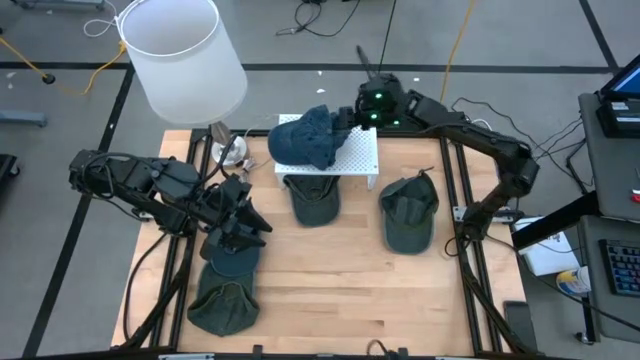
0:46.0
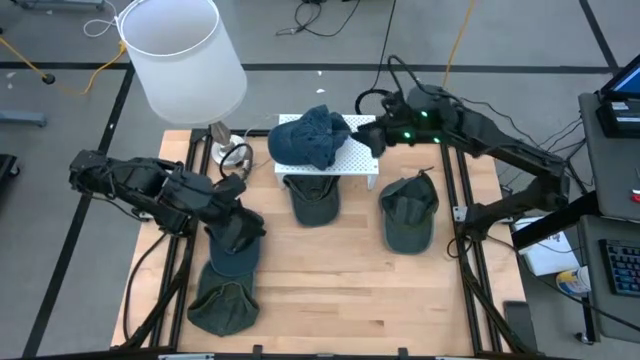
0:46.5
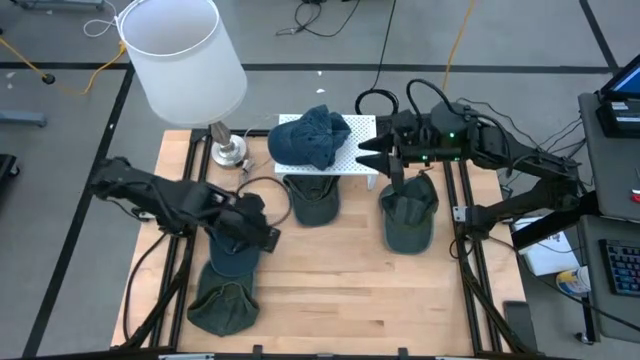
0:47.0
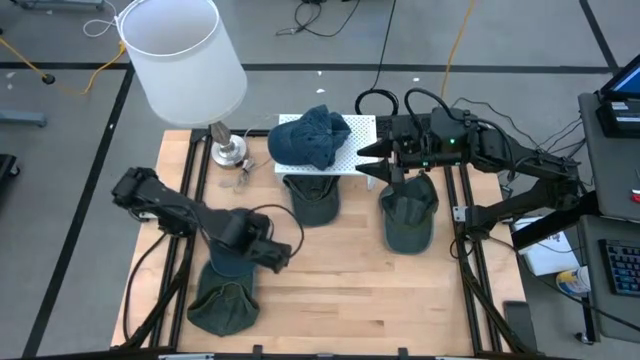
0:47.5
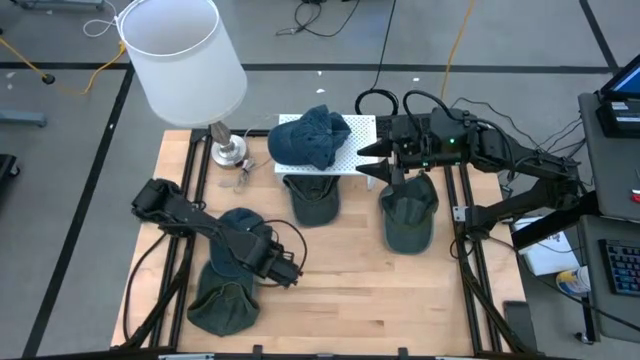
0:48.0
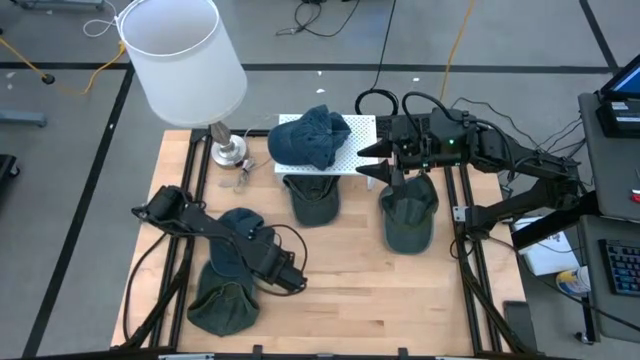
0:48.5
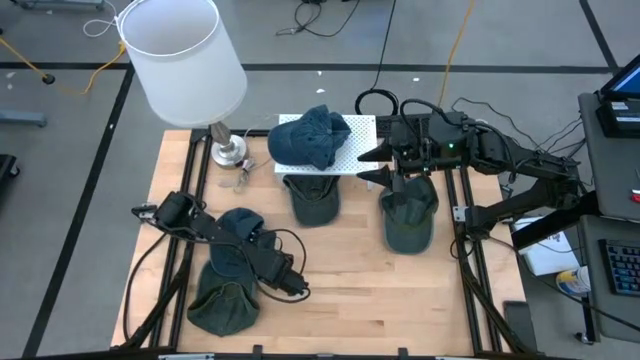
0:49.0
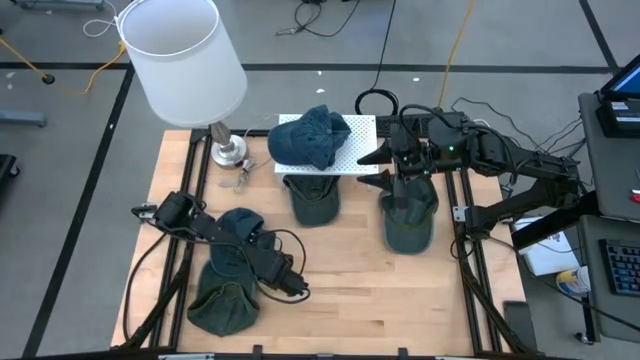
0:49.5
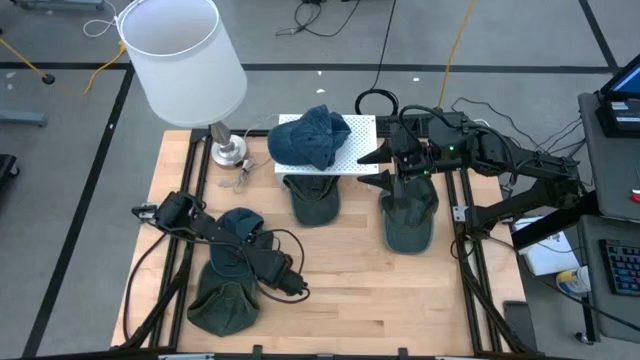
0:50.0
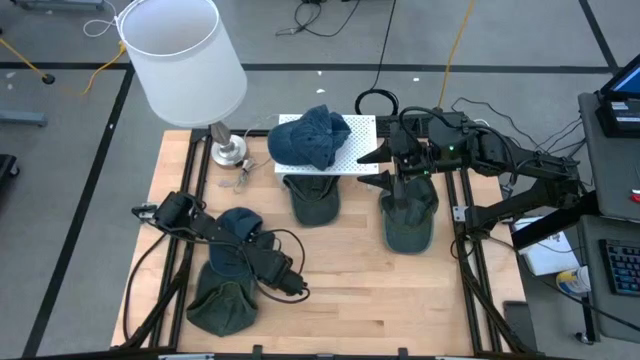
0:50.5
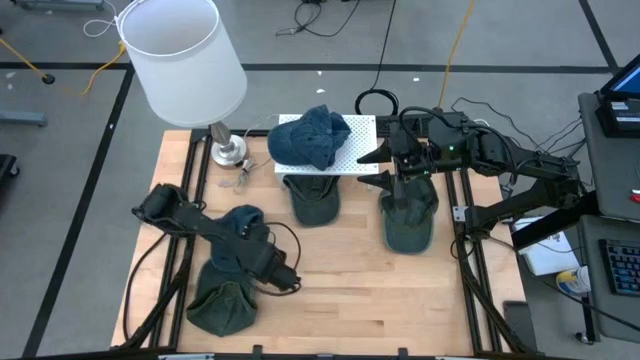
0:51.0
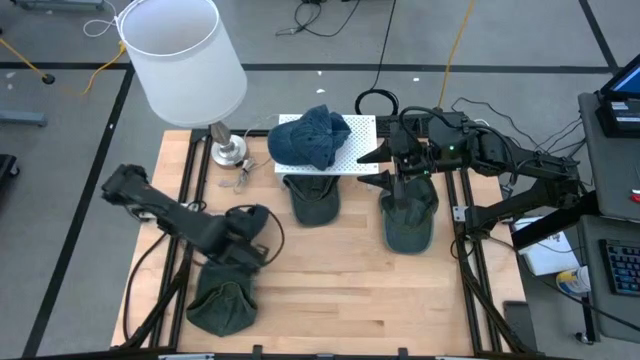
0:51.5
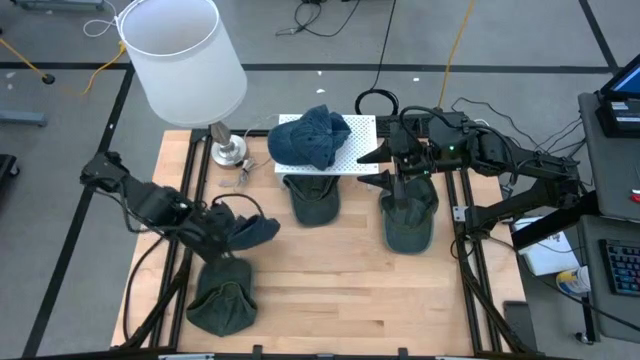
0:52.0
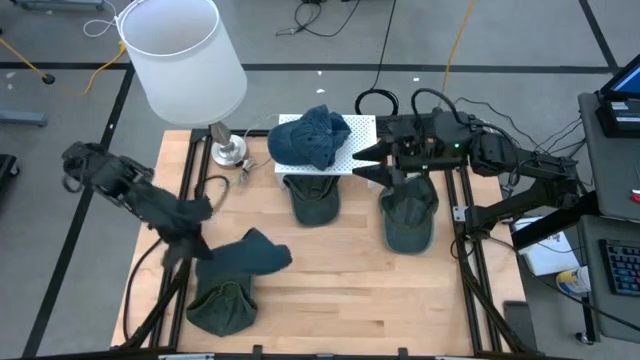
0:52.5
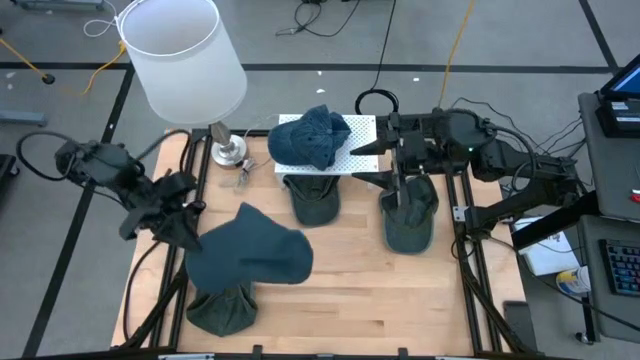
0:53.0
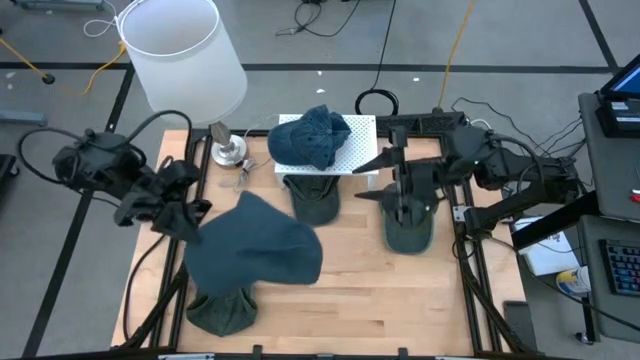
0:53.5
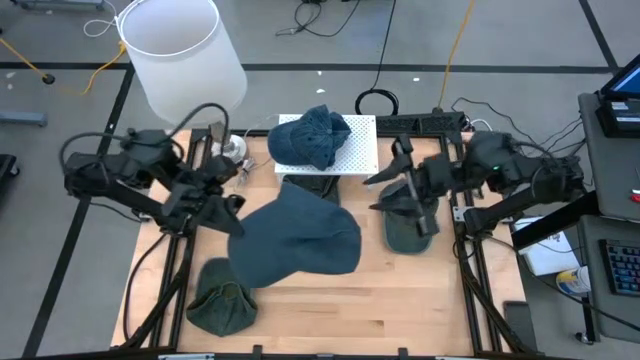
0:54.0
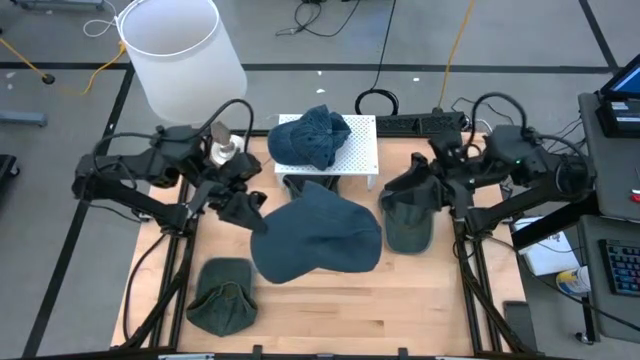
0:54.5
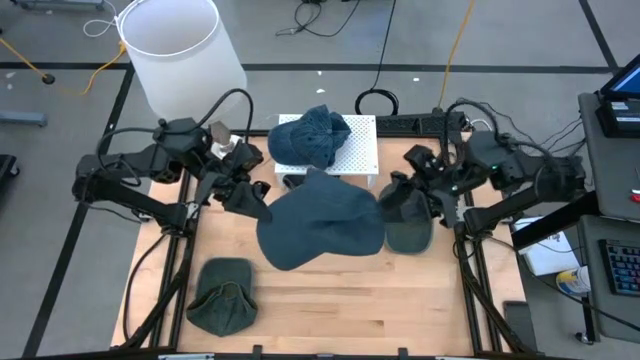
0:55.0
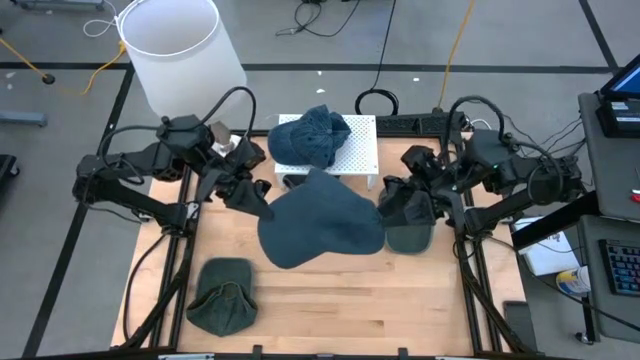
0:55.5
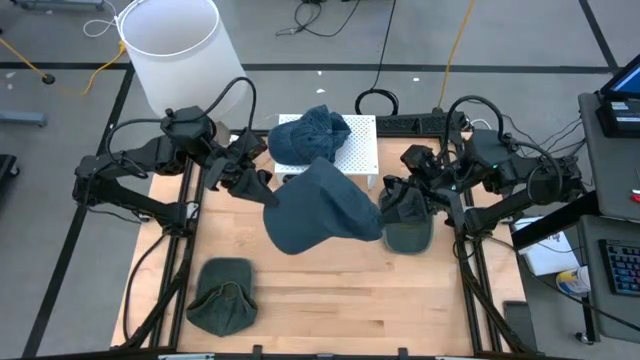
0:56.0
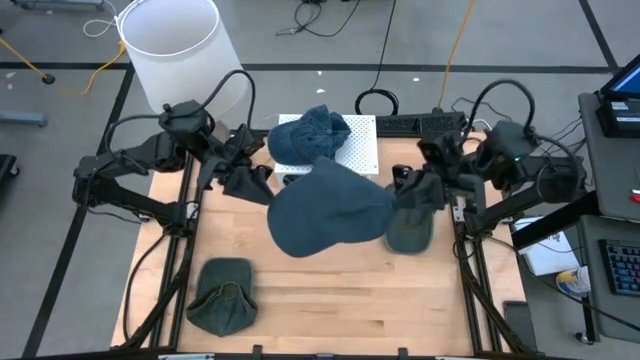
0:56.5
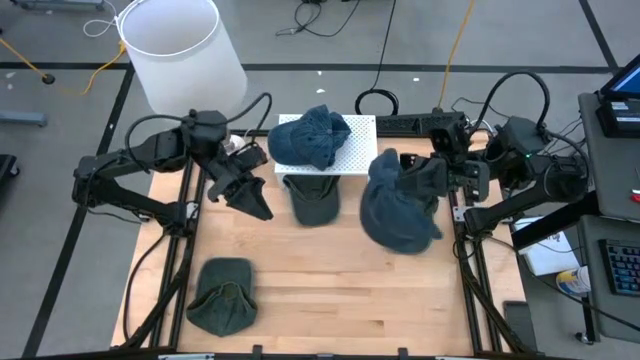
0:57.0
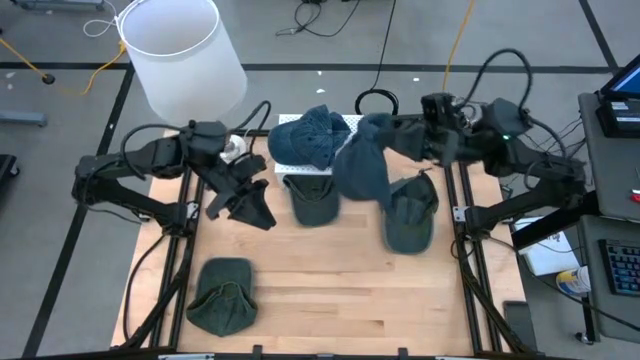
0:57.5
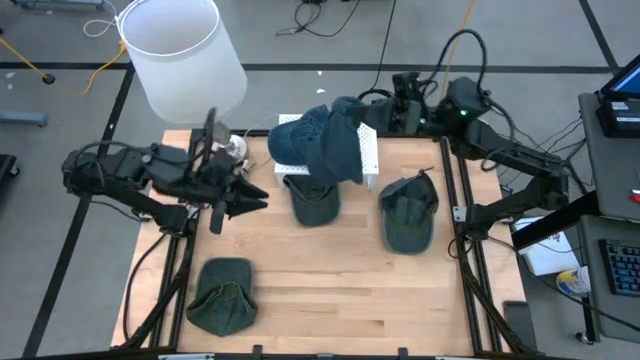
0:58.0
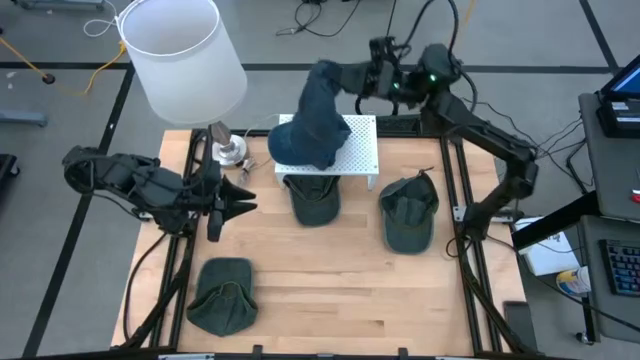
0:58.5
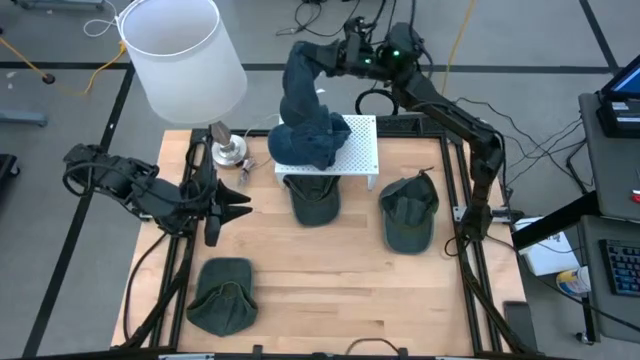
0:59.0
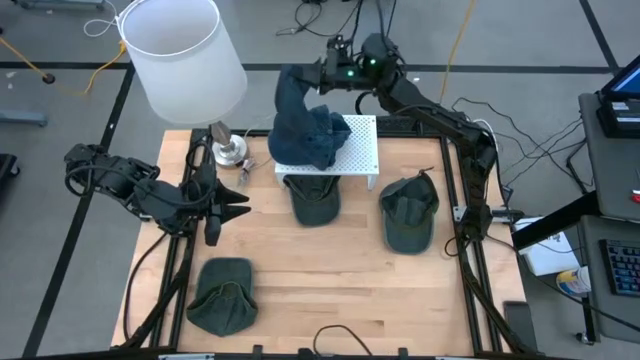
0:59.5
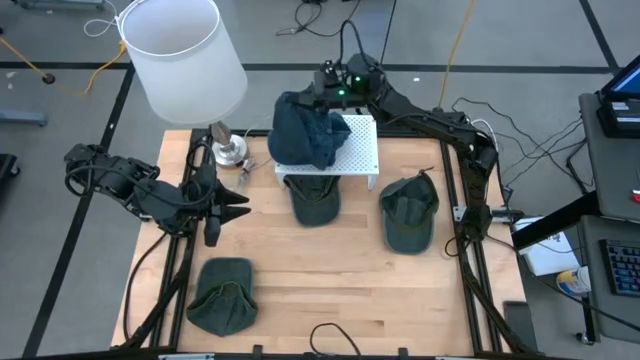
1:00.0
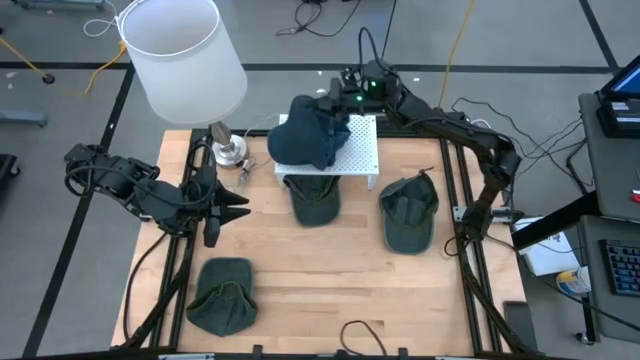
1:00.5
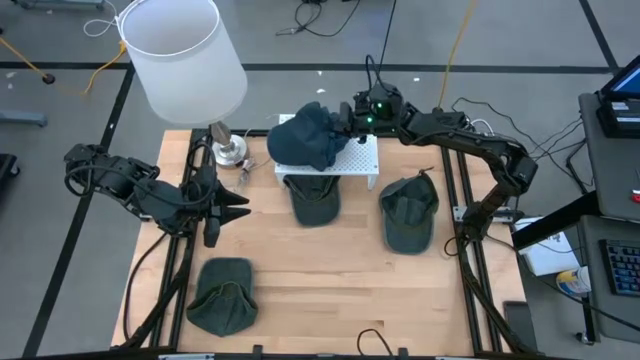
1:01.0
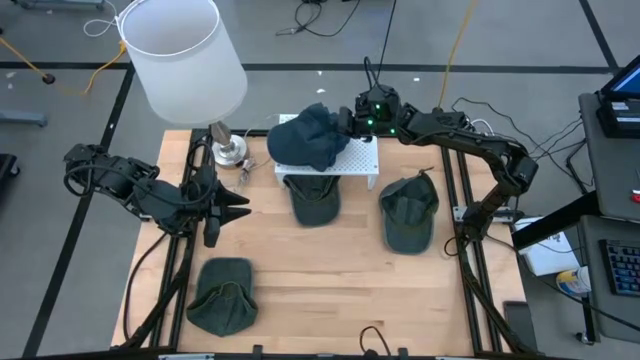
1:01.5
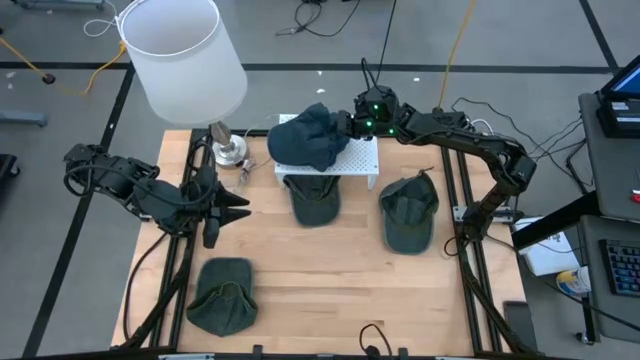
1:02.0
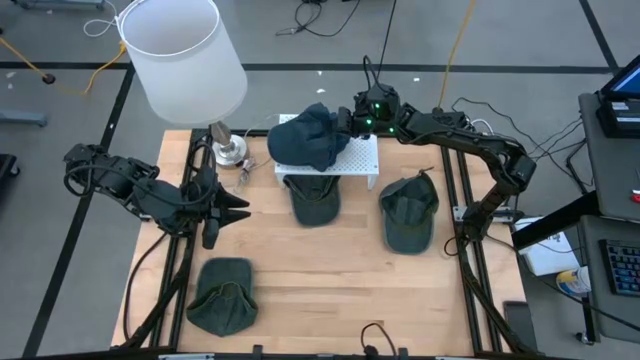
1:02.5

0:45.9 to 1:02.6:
Task: Pick & Place hat
Stack the blue cap on the blue caps on the shelf

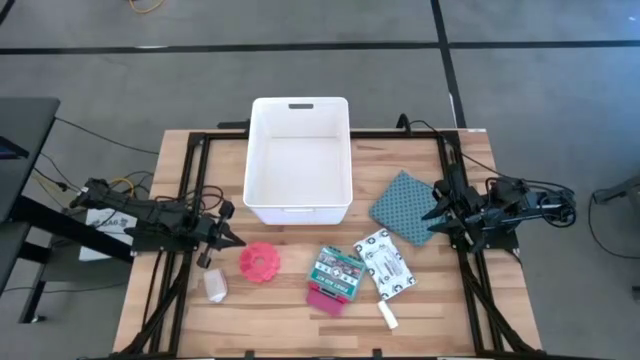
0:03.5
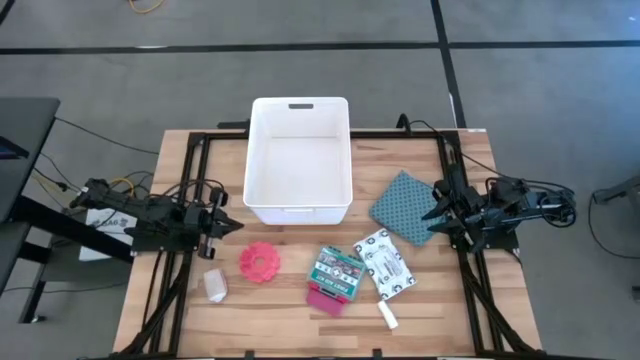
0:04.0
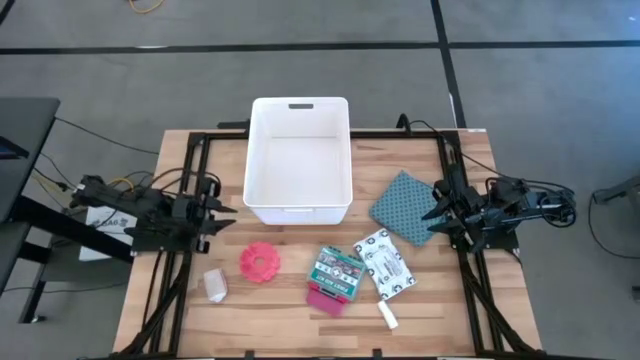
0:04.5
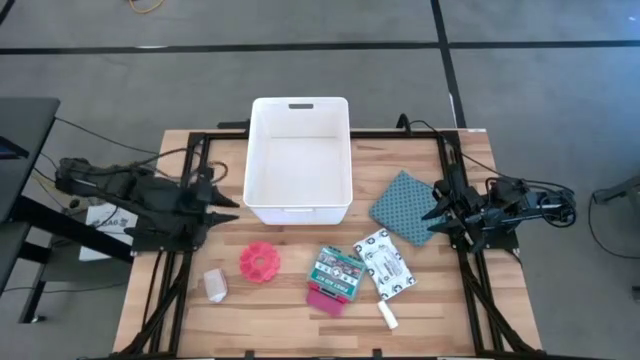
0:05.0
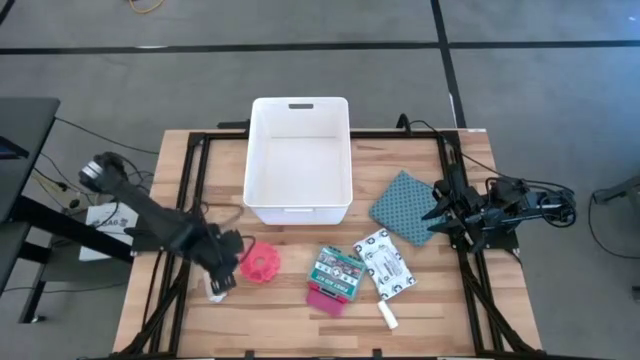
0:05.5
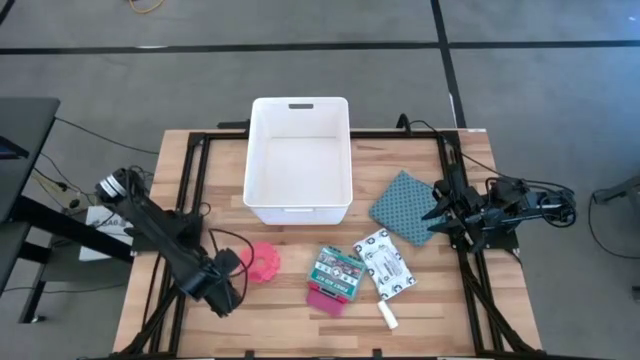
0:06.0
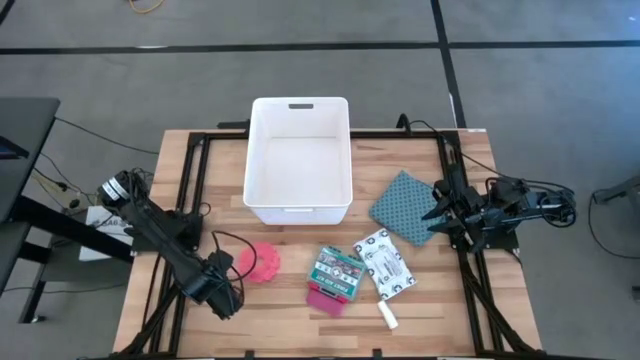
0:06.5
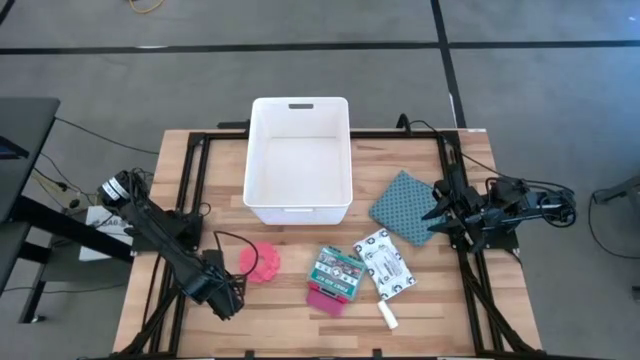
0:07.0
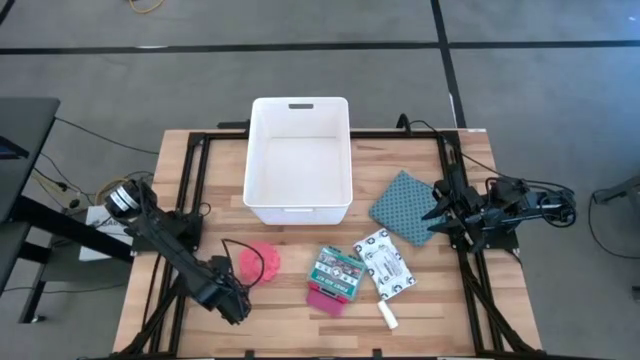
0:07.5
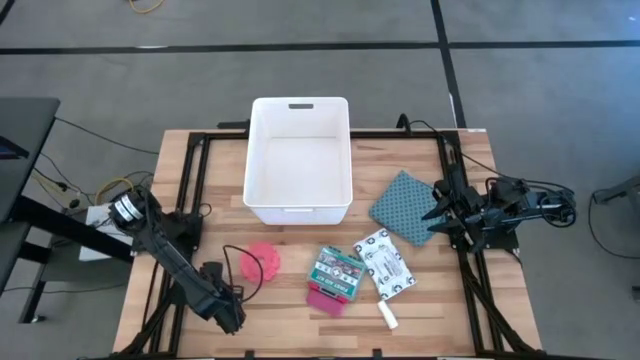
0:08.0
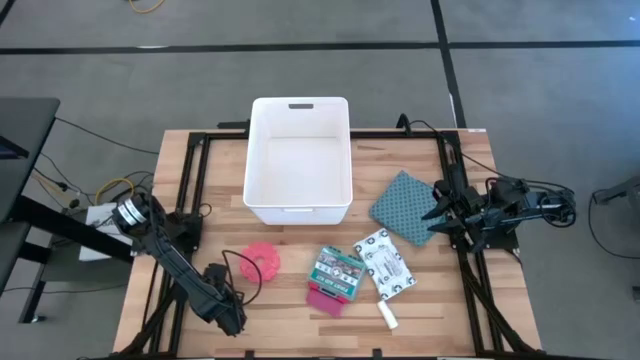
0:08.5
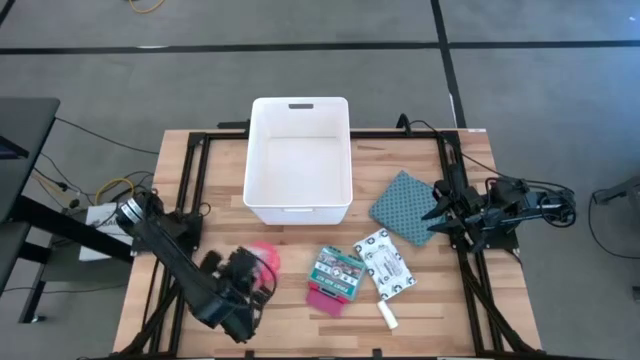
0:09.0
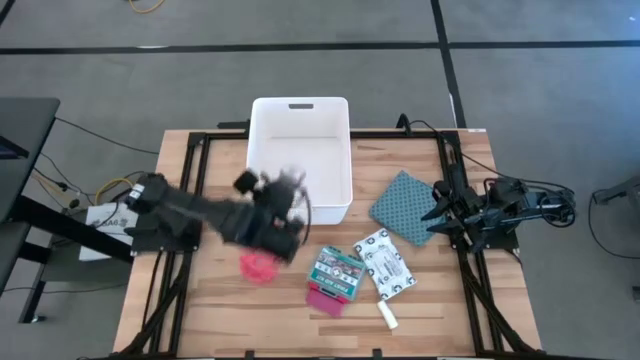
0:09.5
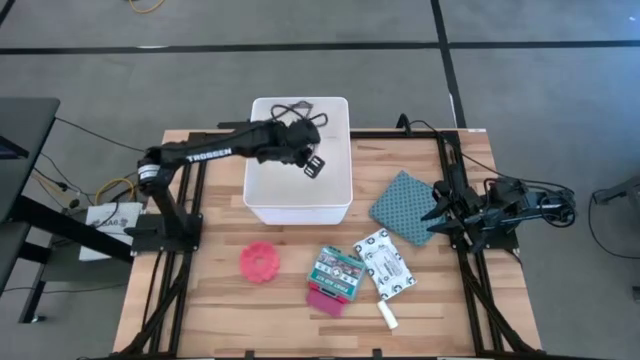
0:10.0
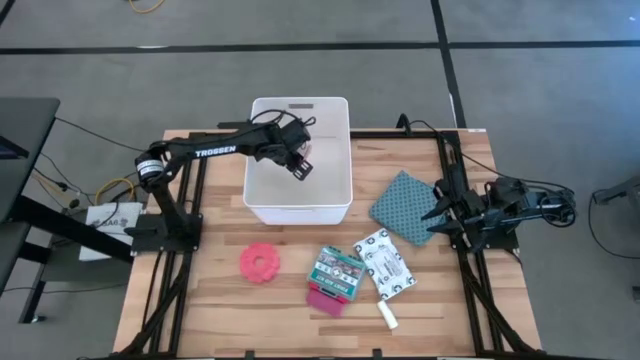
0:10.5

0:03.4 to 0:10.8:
Task: Pick & place medical supplies in basket/bin
Put the white bandage into the white bin
